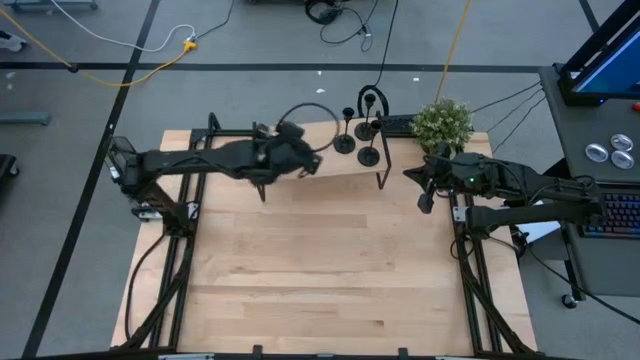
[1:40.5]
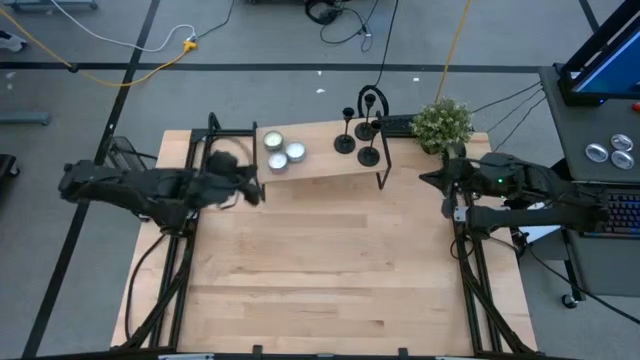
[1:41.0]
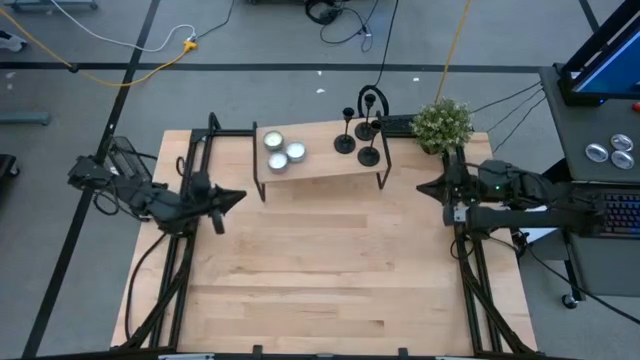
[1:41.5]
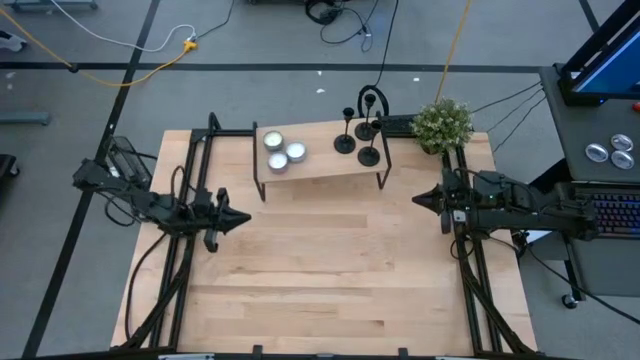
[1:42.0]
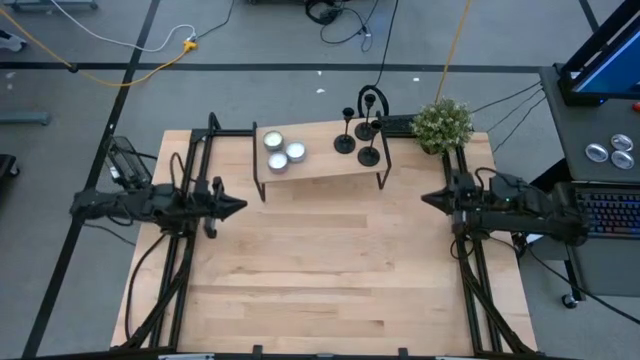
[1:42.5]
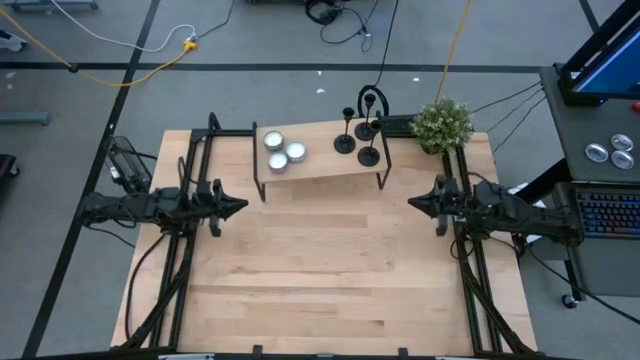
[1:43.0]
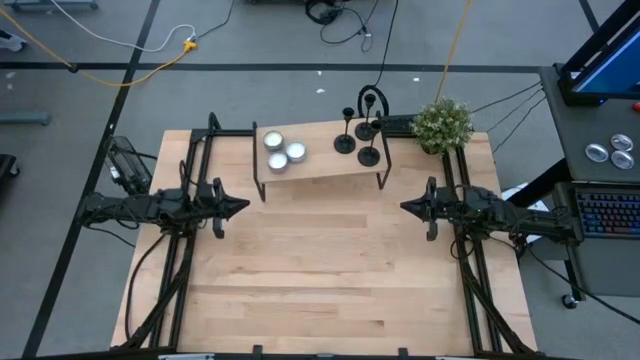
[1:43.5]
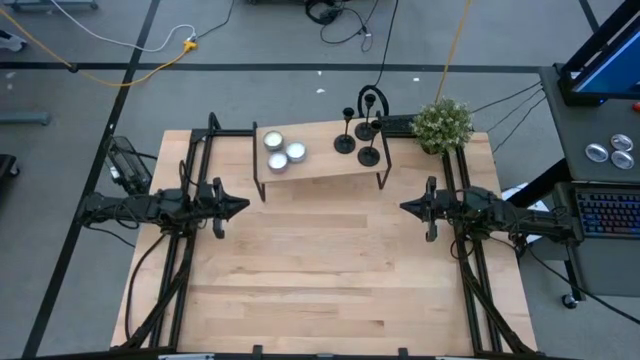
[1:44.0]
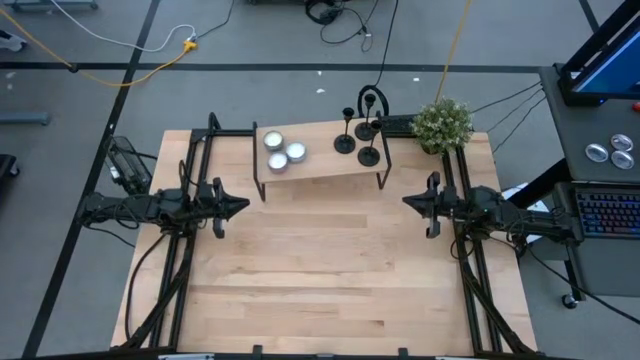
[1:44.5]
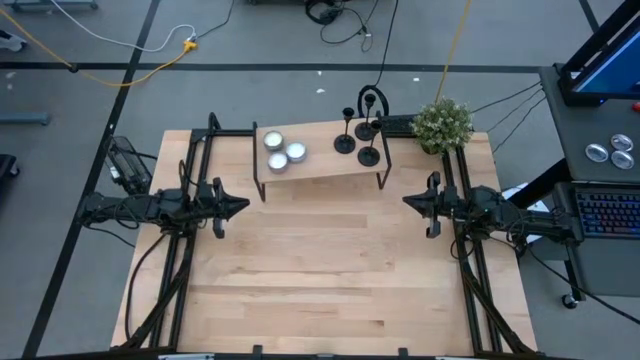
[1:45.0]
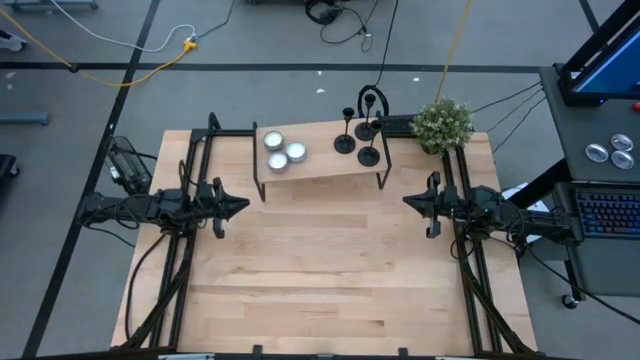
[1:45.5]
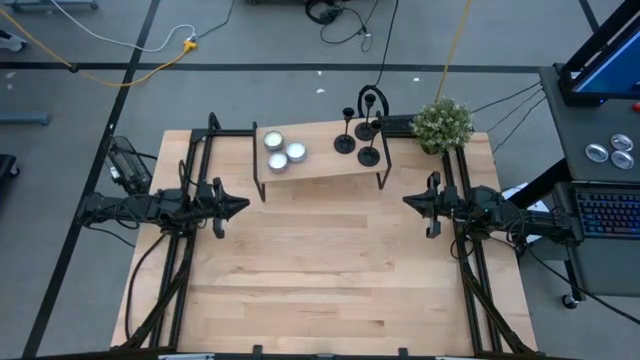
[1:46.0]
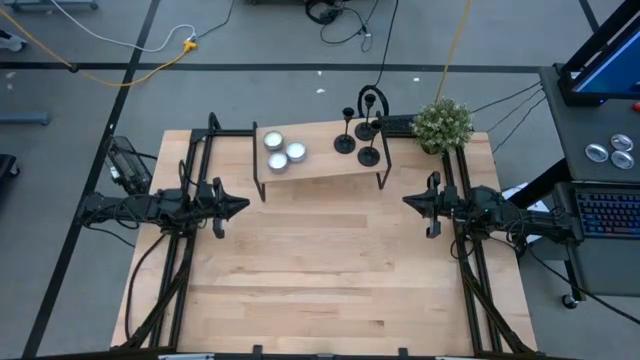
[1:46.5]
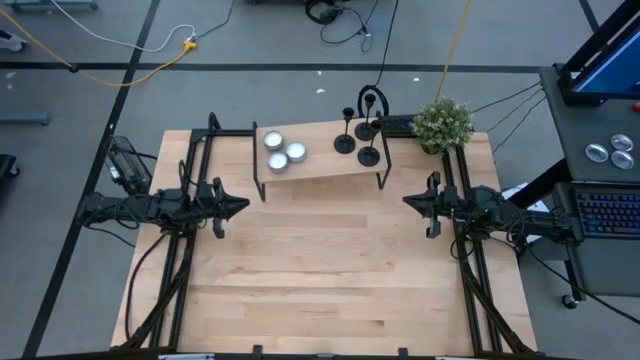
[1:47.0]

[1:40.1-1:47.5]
Task: Pick & Place candle stick holders
Return to Home Position

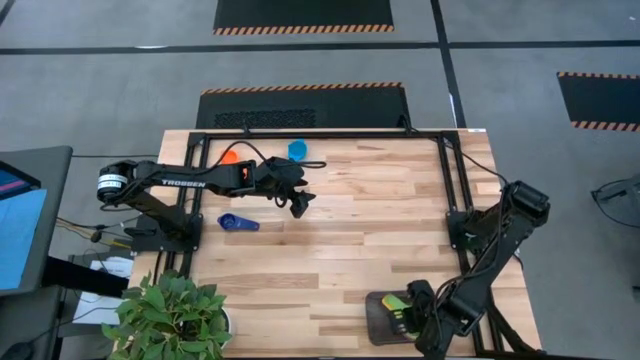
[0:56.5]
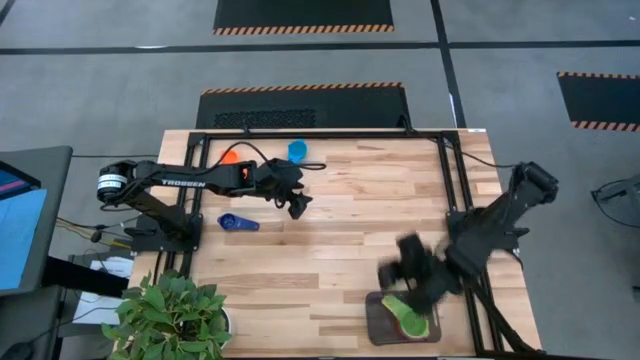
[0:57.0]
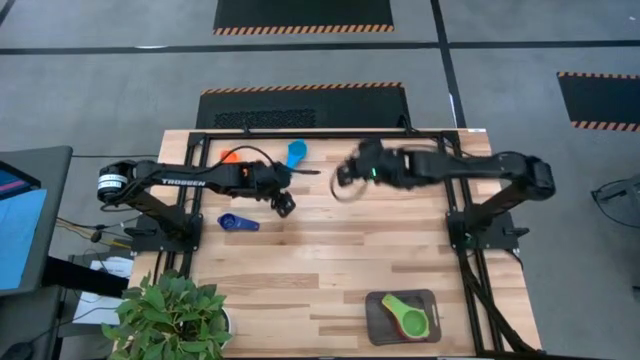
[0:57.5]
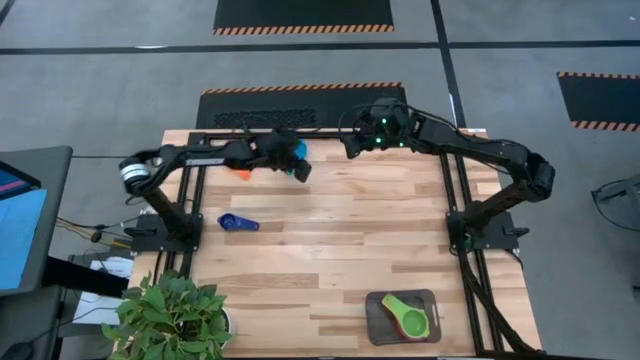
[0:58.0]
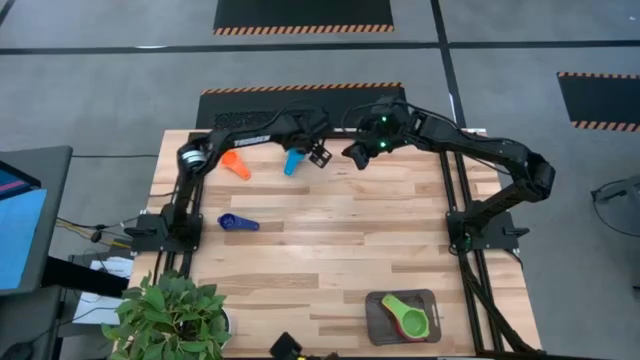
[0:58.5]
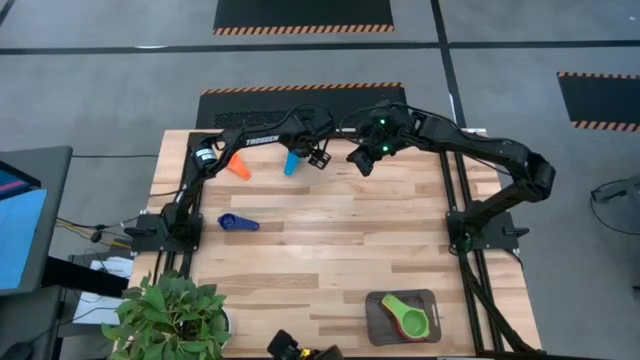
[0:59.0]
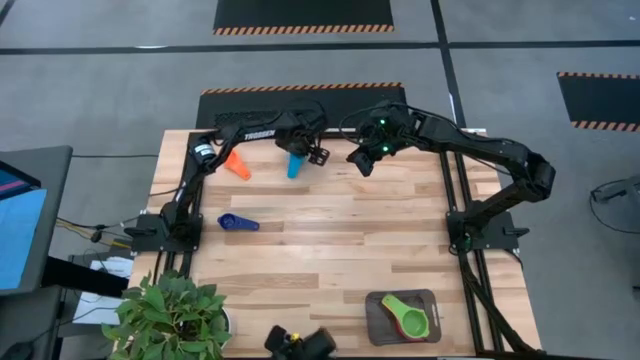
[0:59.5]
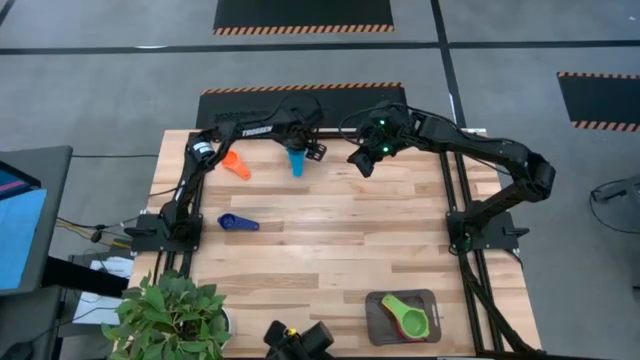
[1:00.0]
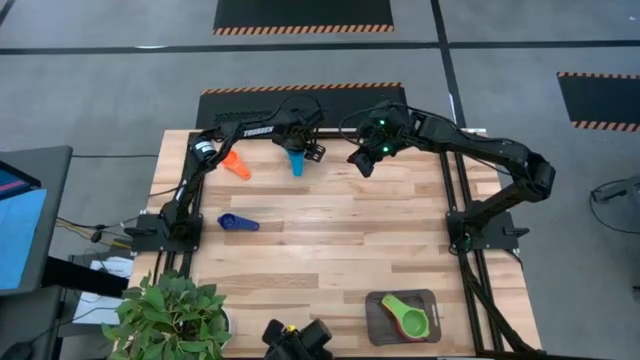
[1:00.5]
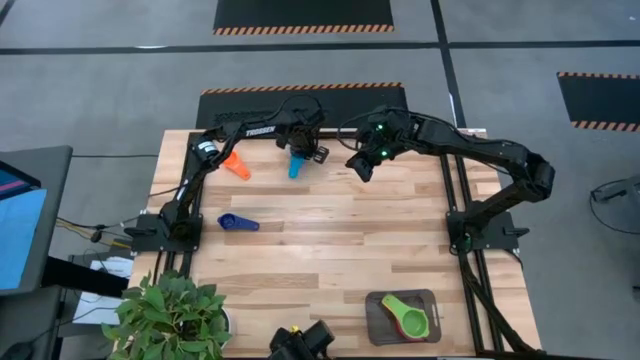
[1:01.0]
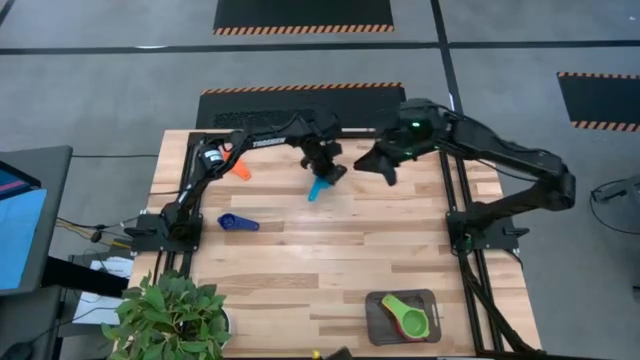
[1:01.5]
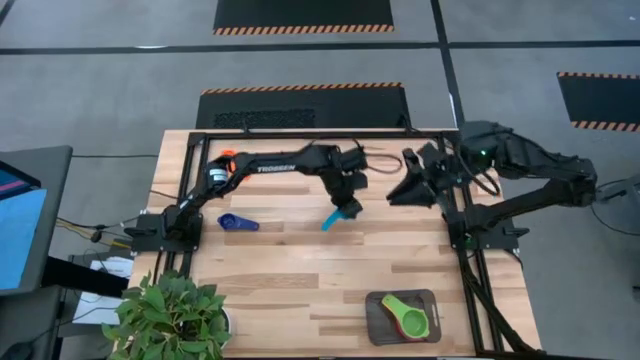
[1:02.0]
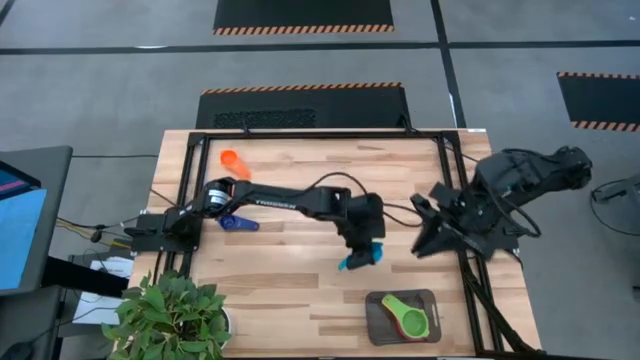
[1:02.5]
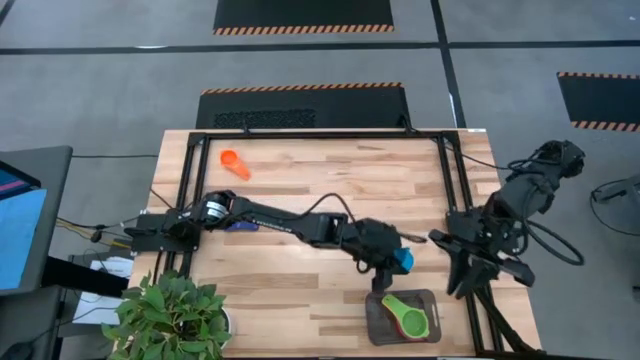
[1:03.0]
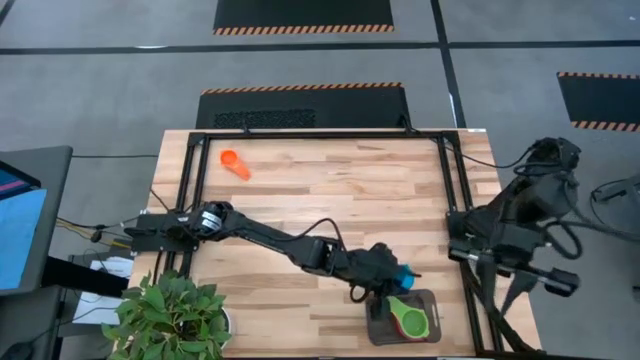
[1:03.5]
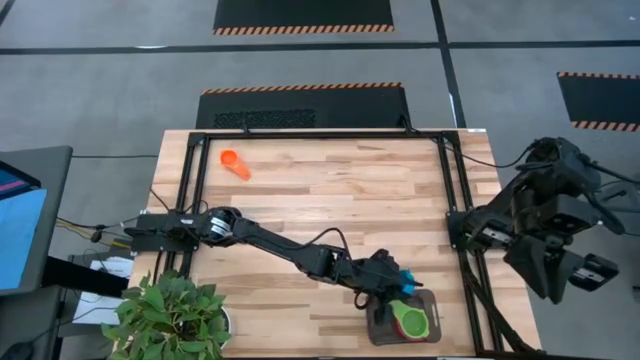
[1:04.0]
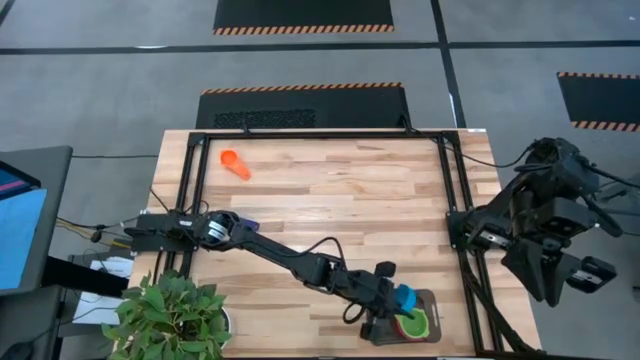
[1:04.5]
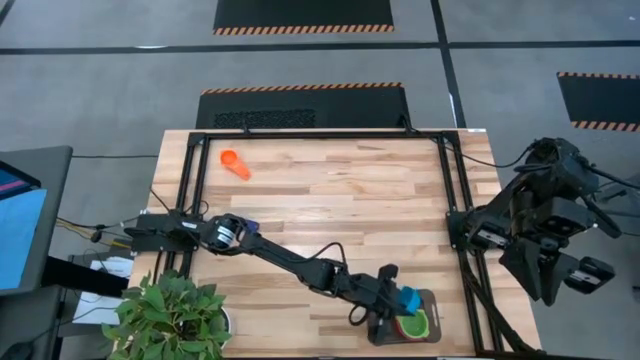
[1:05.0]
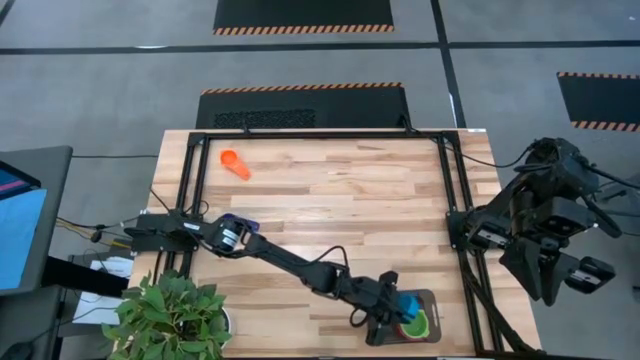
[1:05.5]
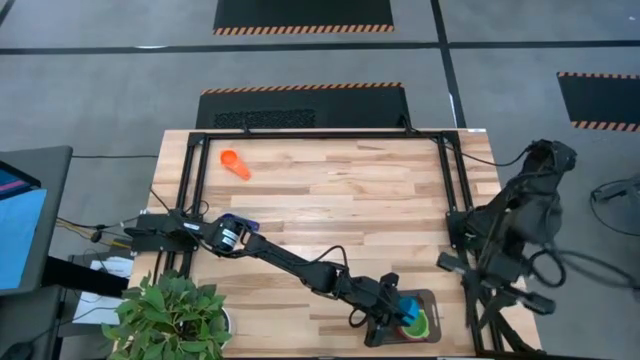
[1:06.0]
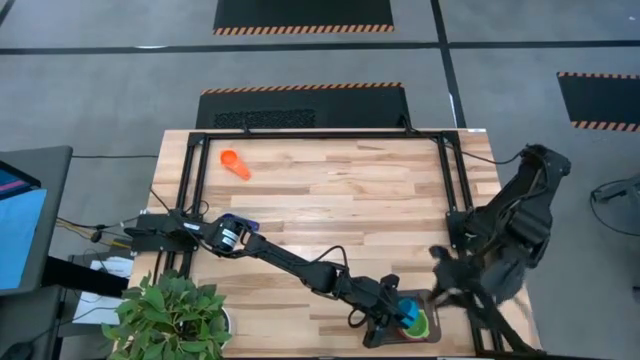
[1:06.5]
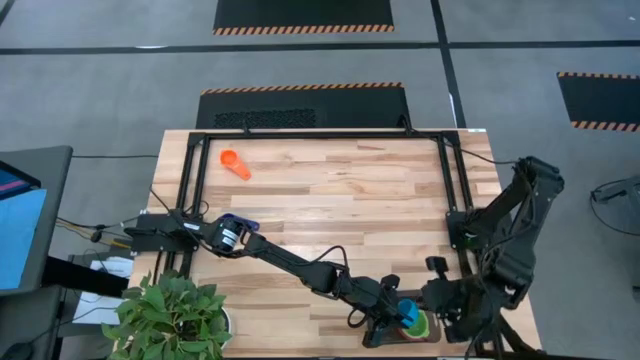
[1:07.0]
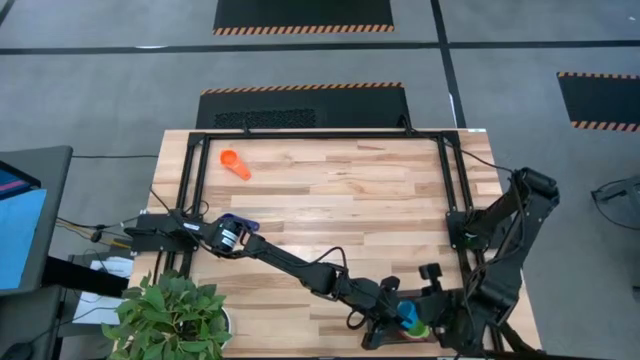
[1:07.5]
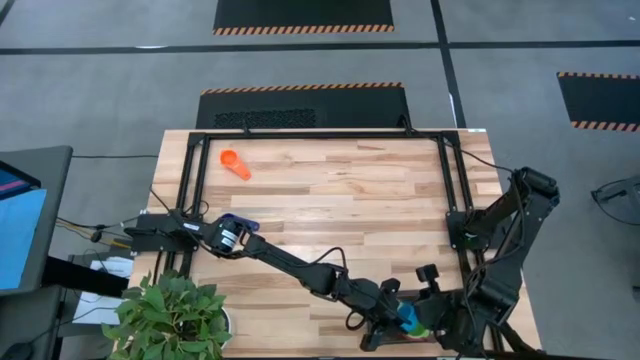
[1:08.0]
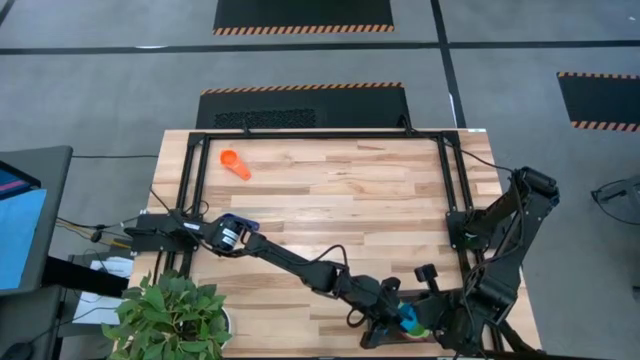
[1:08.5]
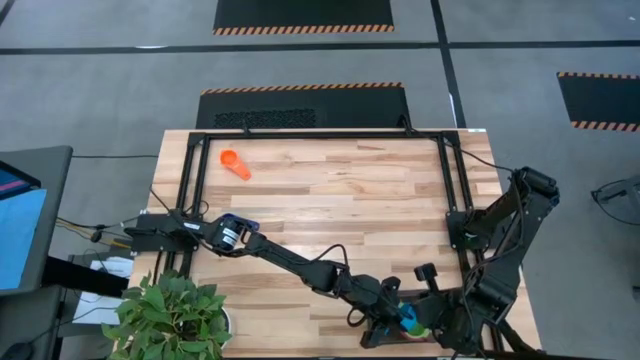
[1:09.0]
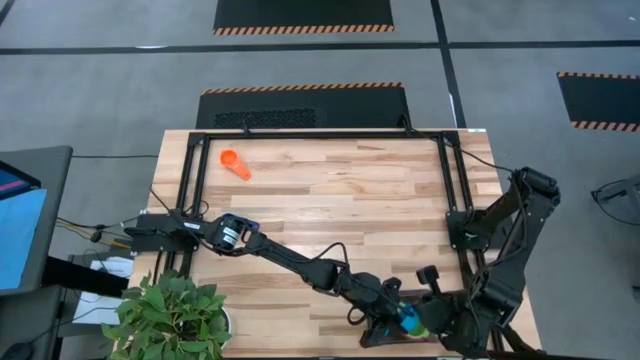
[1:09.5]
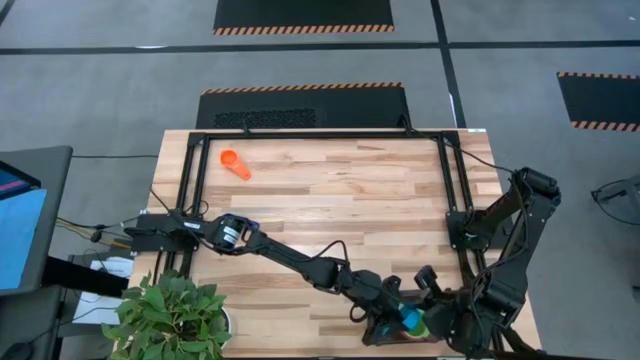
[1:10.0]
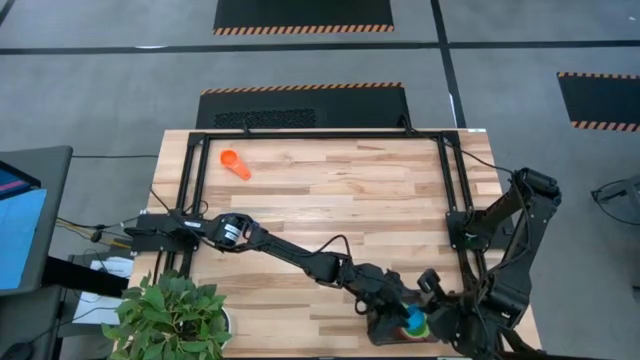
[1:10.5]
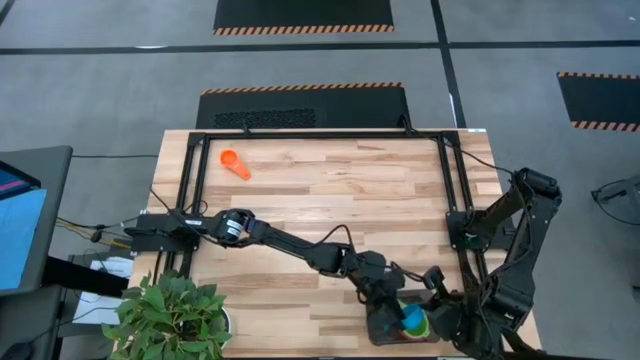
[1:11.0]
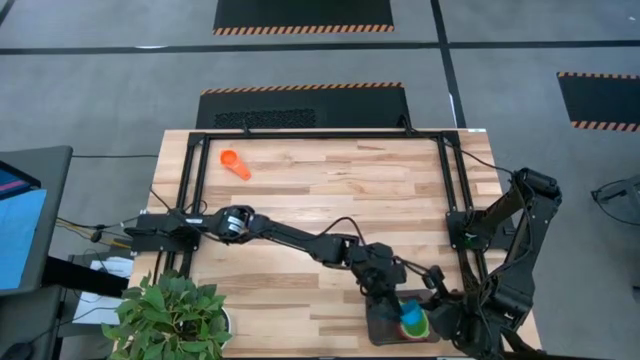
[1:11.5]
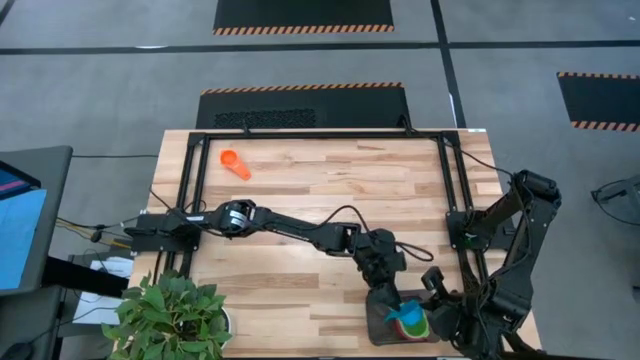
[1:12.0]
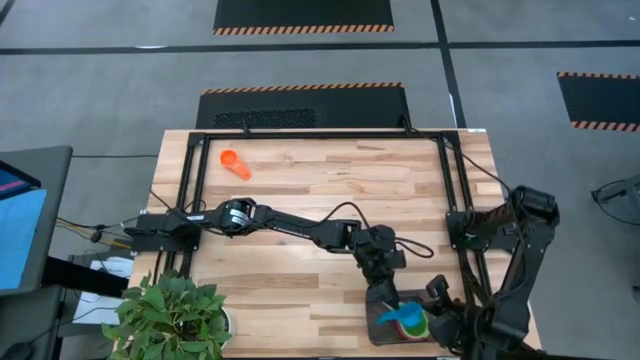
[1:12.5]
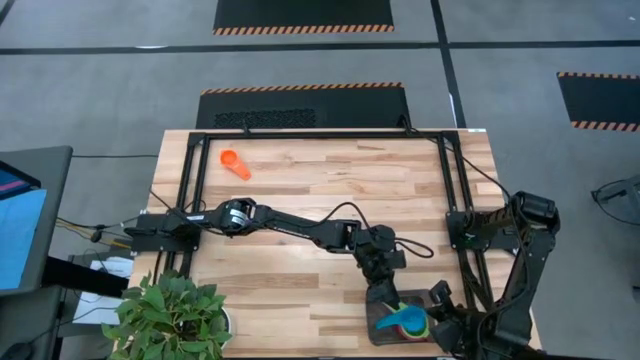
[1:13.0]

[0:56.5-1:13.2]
Task: Nest measuring cups in basket
Stack the light blue measuring cup on top of the green measuring cup in the black bin
